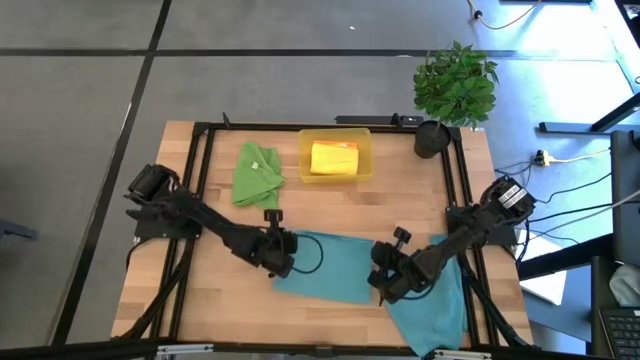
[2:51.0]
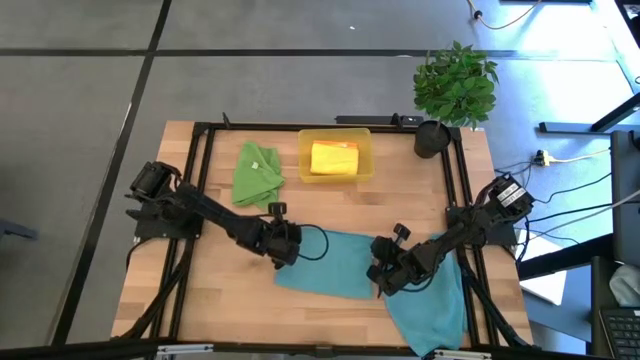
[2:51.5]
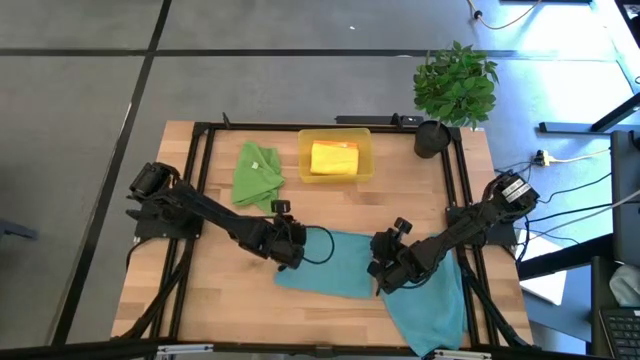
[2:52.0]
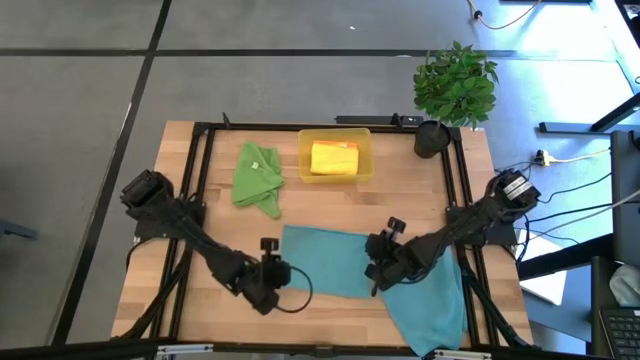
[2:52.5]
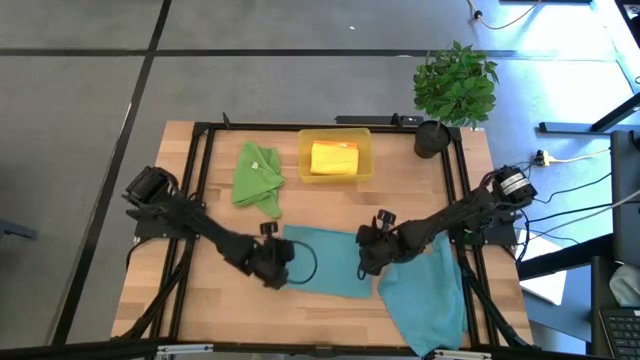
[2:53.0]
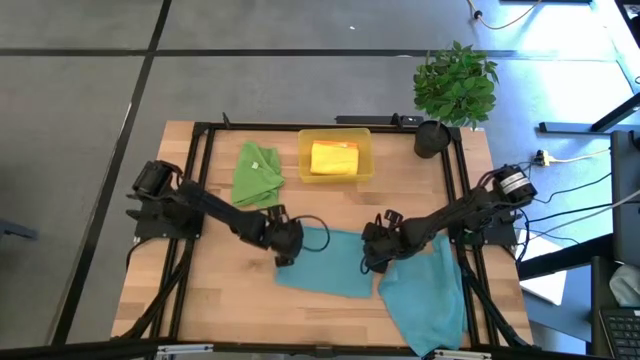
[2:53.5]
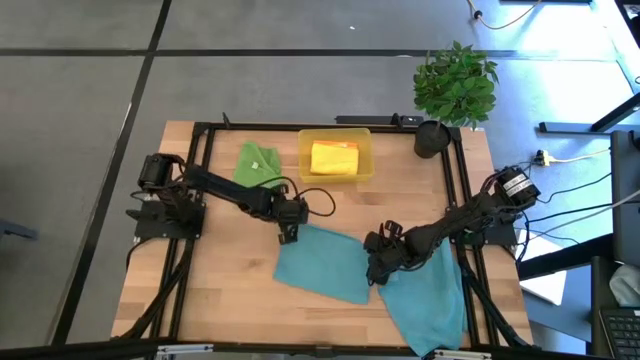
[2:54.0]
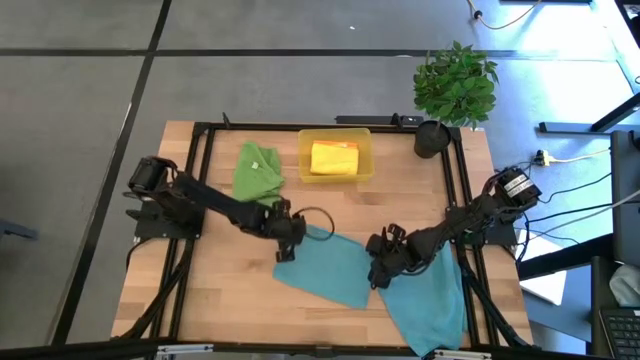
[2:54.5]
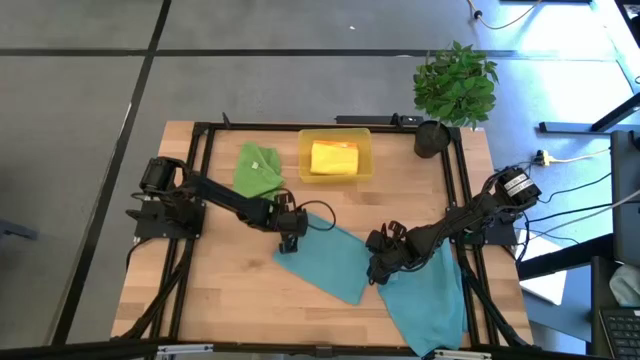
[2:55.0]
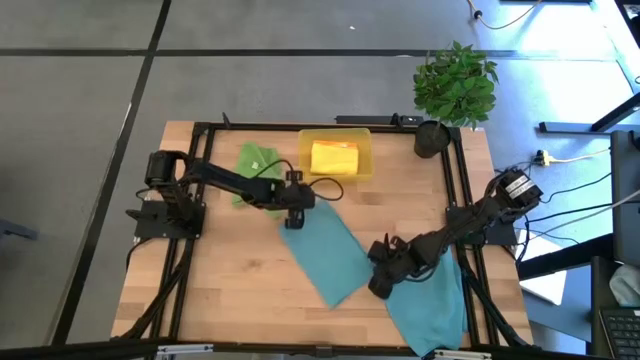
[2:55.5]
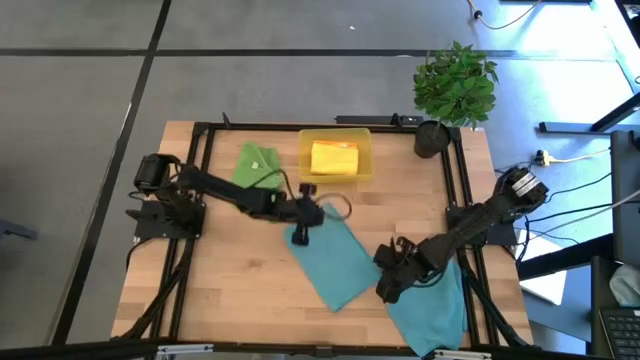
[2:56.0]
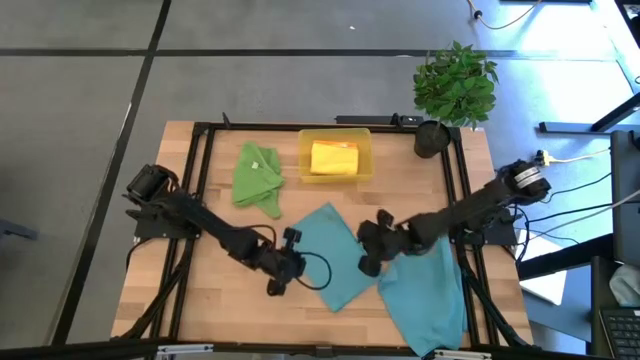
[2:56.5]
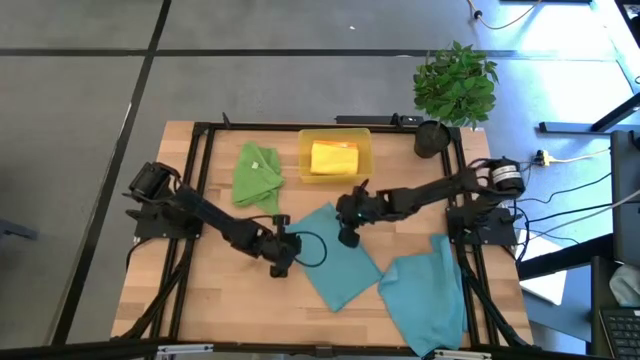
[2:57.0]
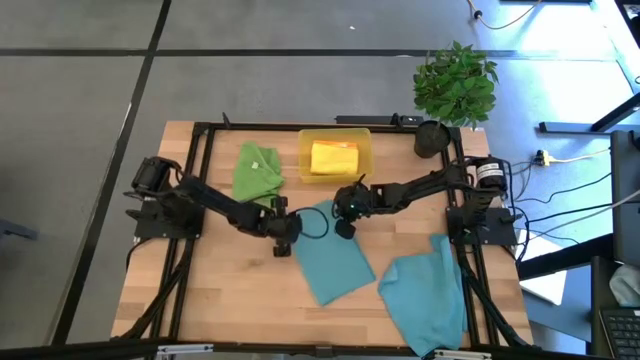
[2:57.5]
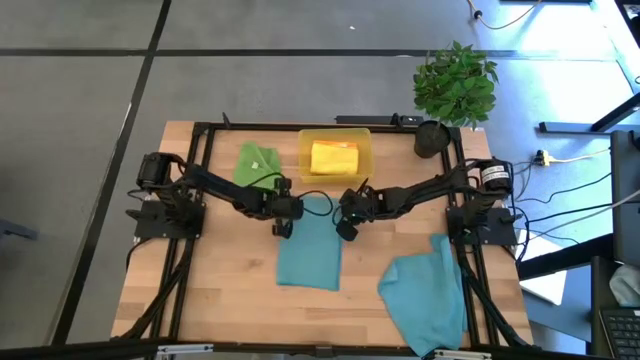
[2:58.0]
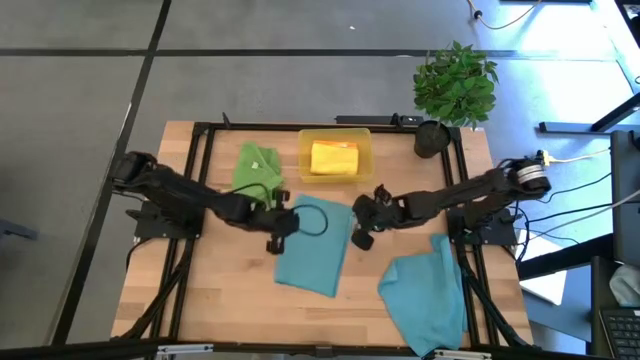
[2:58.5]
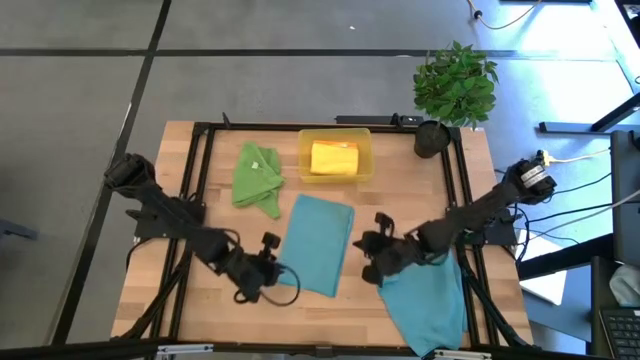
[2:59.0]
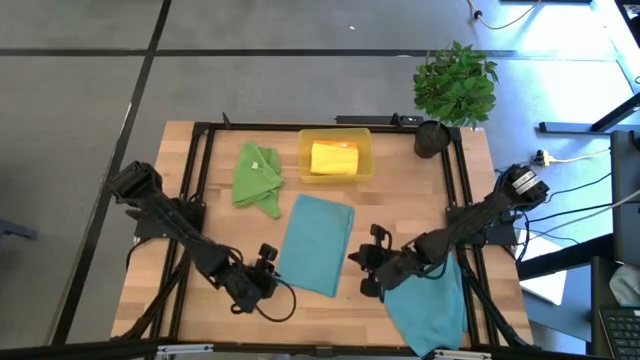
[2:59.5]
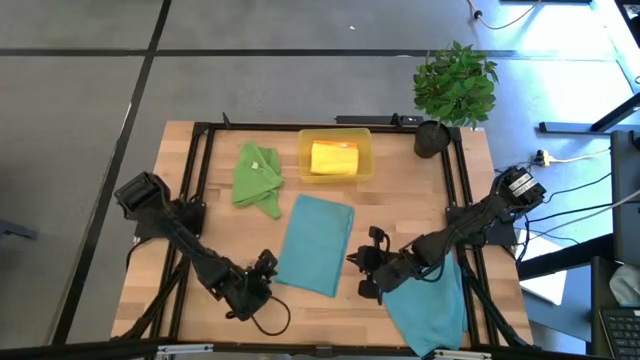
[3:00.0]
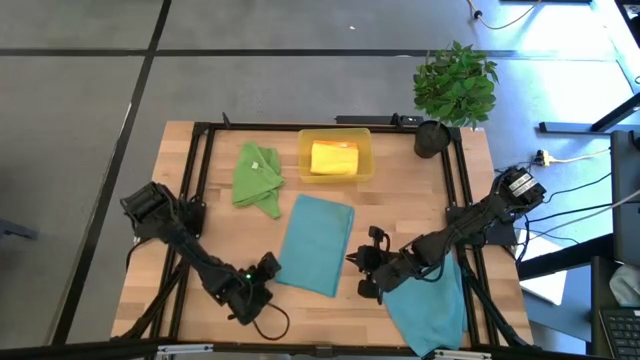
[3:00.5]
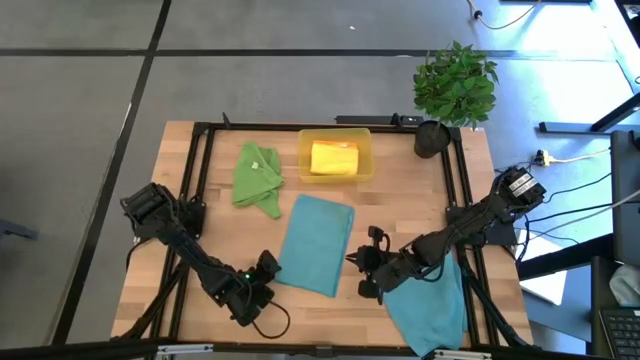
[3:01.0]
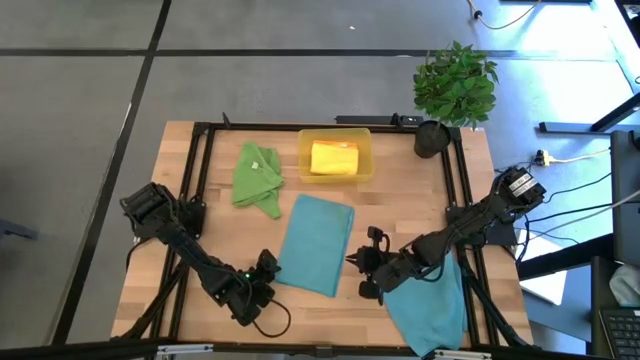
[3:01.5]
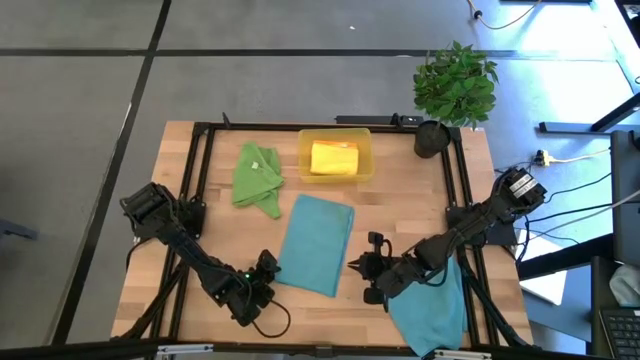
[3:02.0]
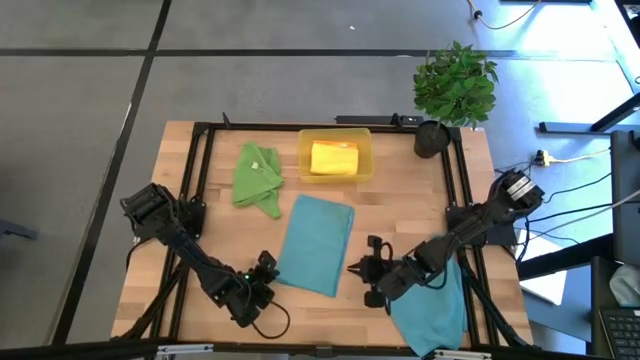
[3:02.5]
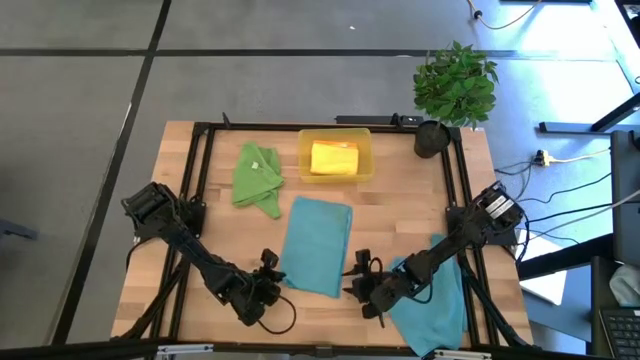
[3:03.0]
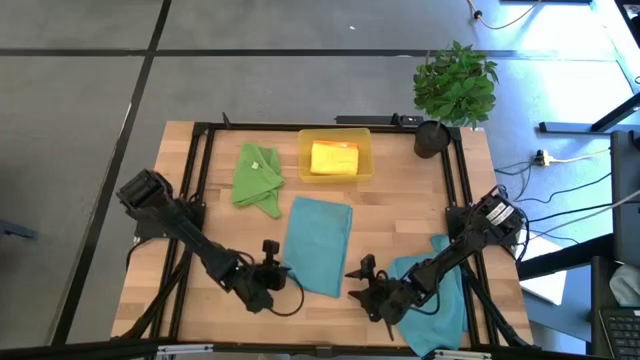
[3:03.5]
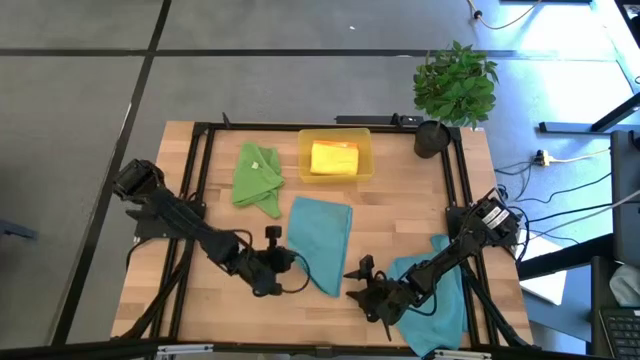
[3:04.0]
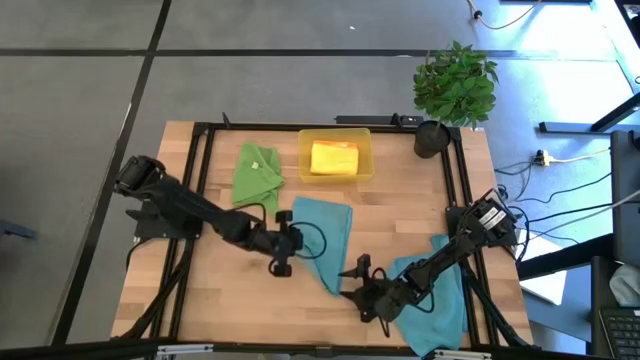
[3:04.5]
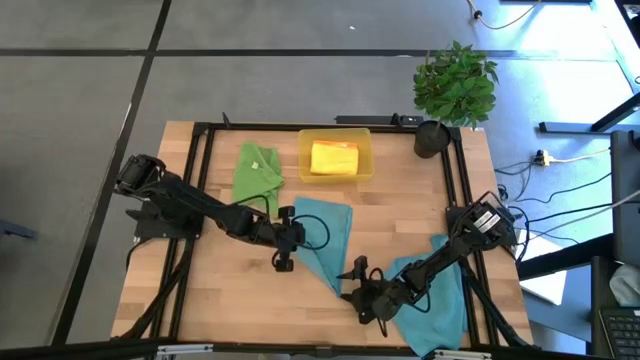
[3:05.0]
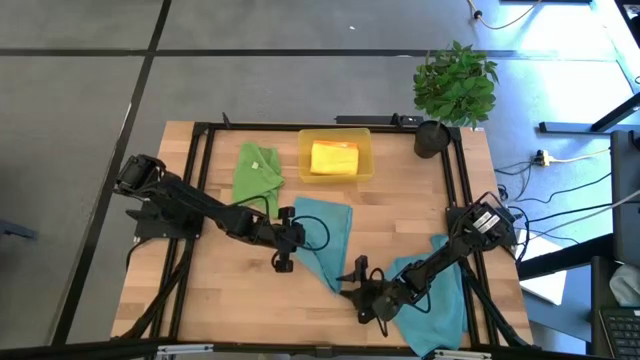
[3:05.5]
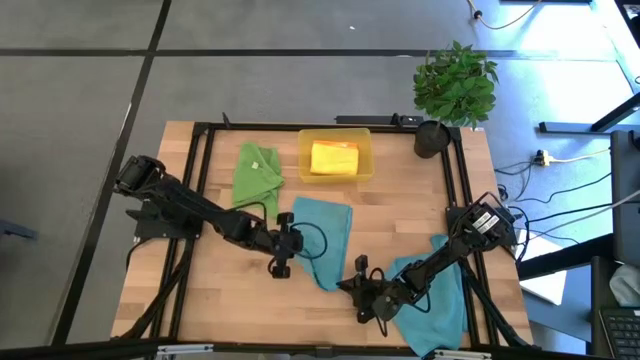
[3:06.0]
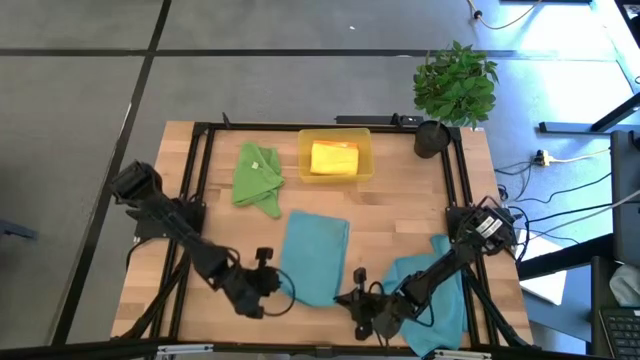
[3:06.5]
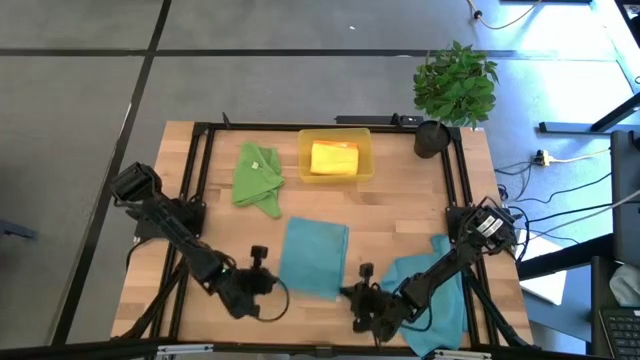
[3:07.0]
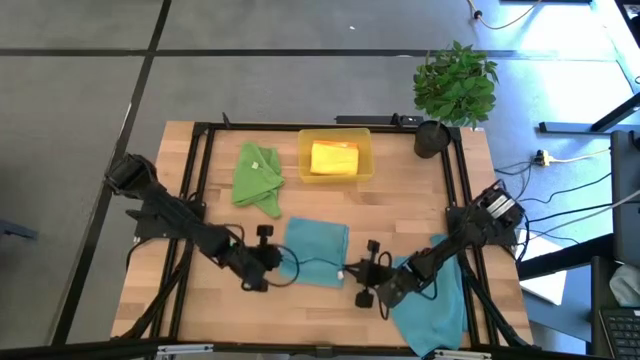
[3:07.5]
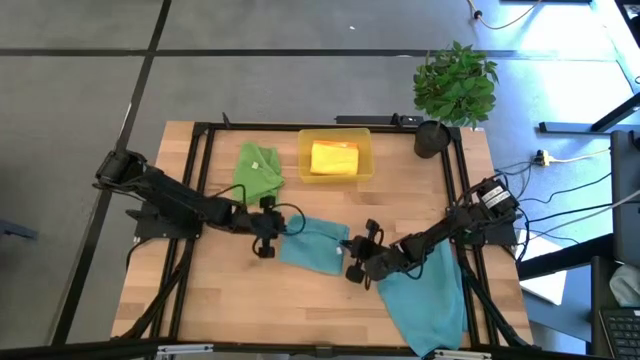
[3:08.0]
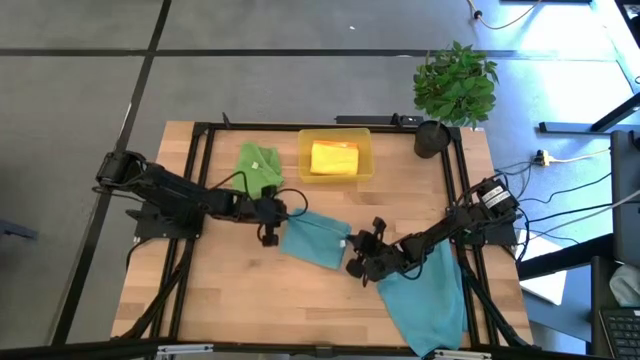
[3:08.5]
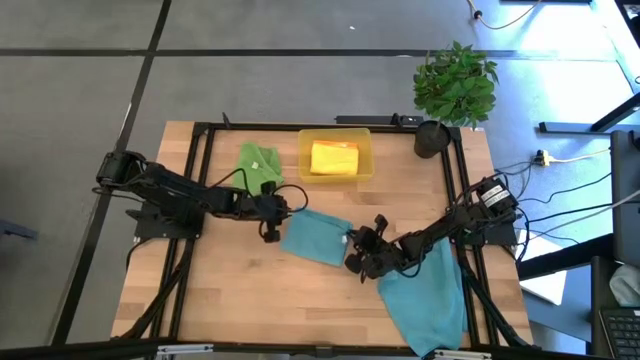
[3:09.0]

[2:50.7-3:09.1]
Task: Fold microfiber towels
Fold the top blue microfiber cloth

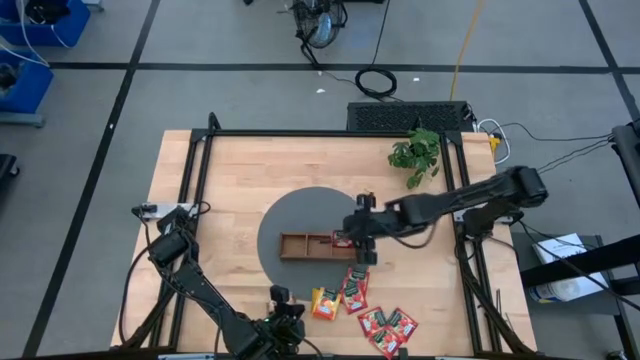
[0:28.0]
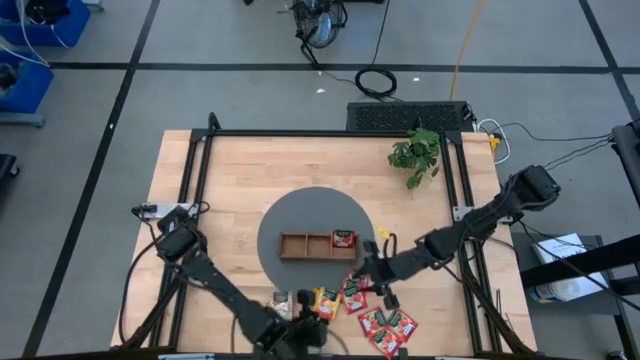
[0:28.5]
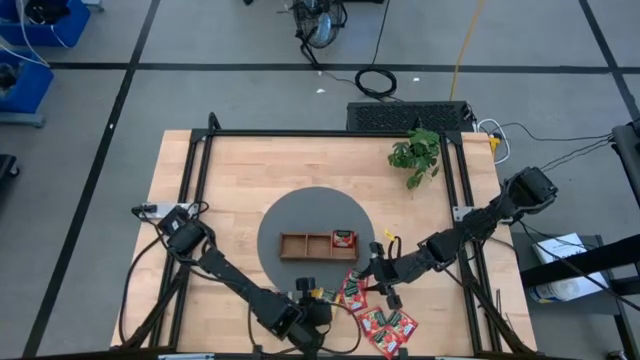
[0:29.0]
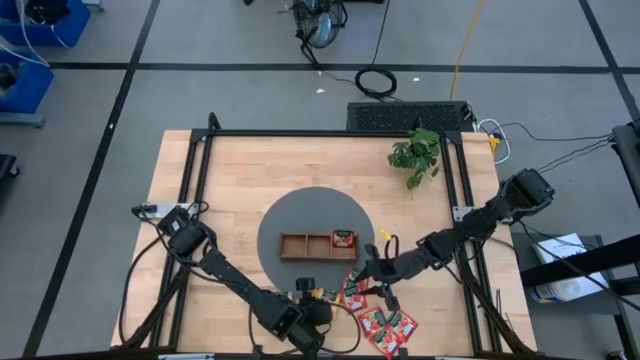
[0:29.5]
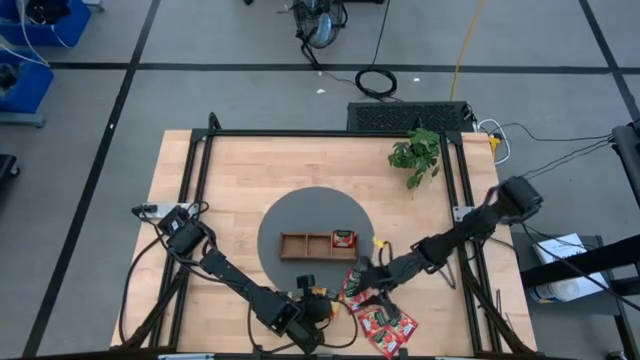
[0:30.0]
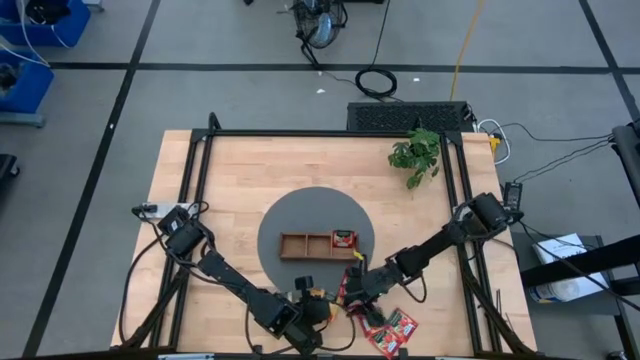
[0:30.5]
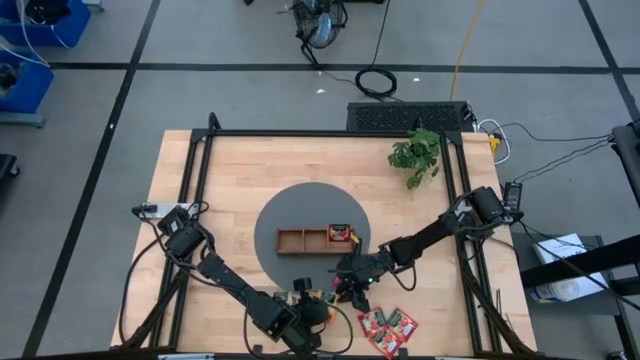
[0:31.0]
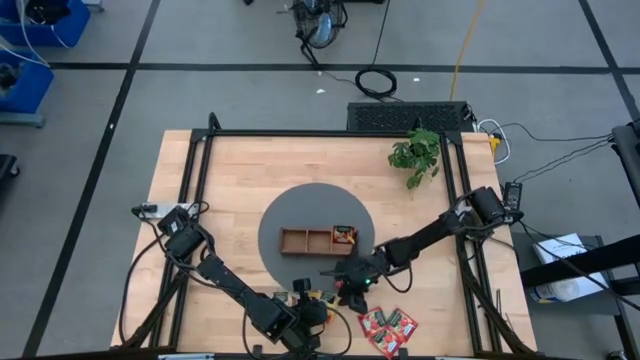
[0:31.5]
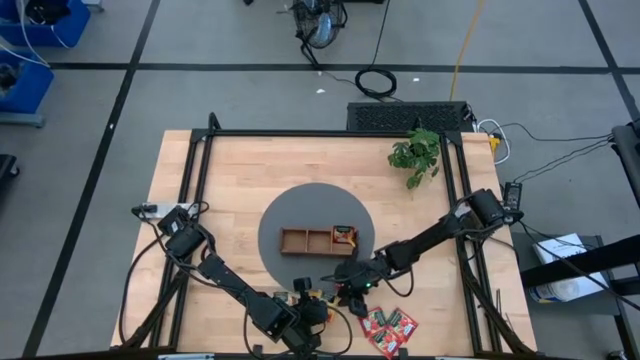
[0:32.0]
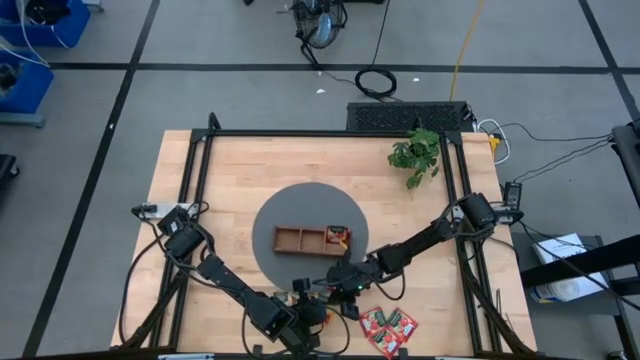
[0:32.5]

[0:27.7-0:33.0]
Task: Pick & Place Tea
Put the yellow tea sachet into the middle section of the wooden organizer
